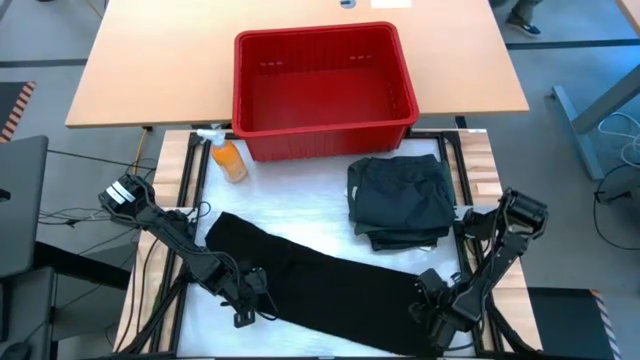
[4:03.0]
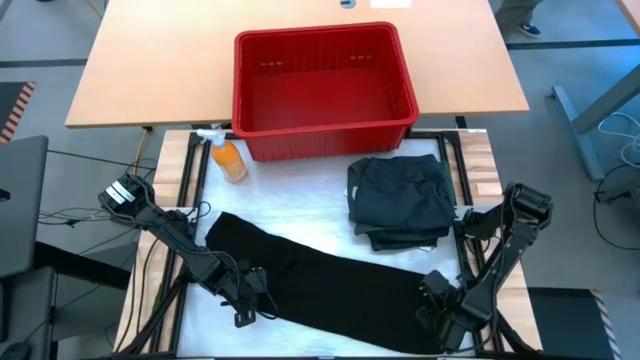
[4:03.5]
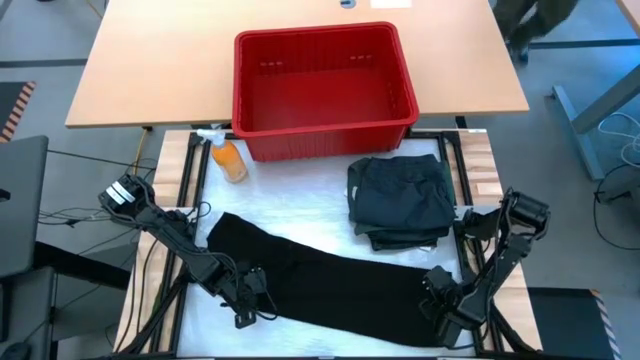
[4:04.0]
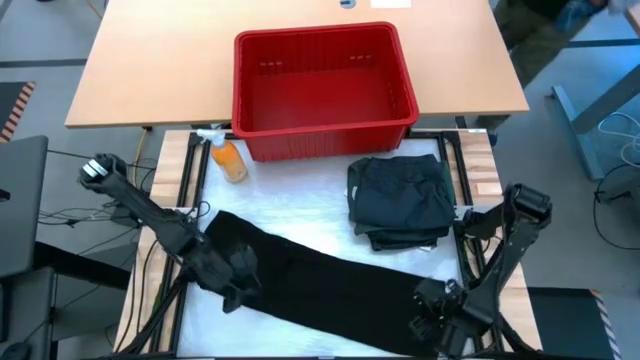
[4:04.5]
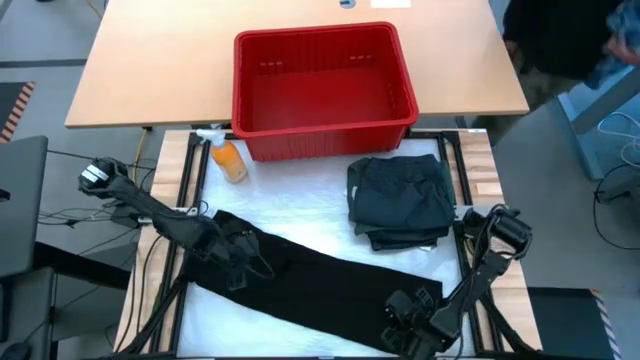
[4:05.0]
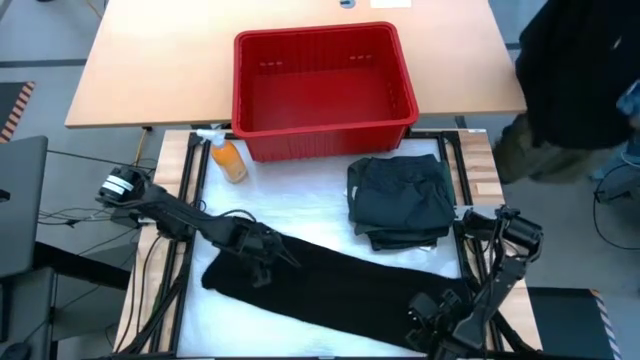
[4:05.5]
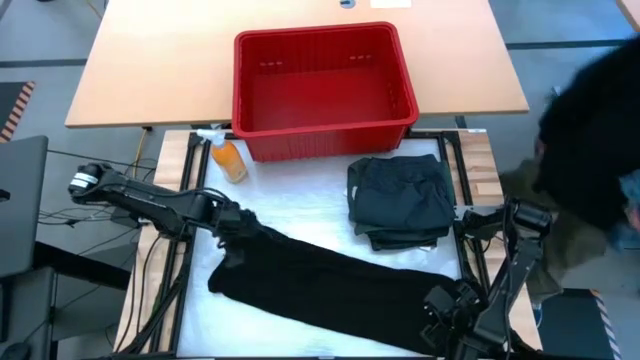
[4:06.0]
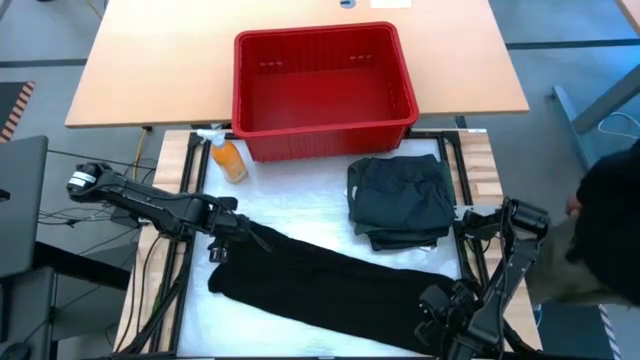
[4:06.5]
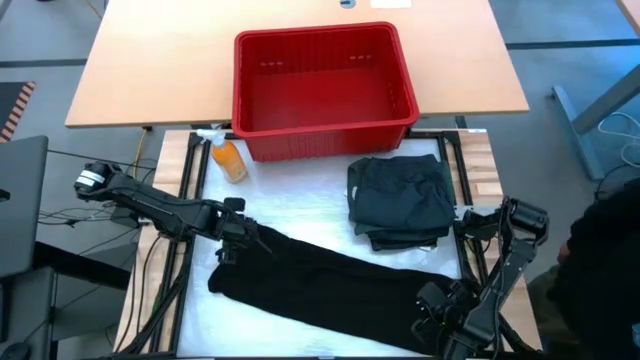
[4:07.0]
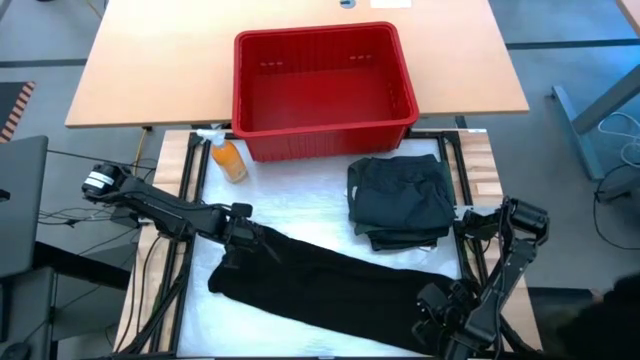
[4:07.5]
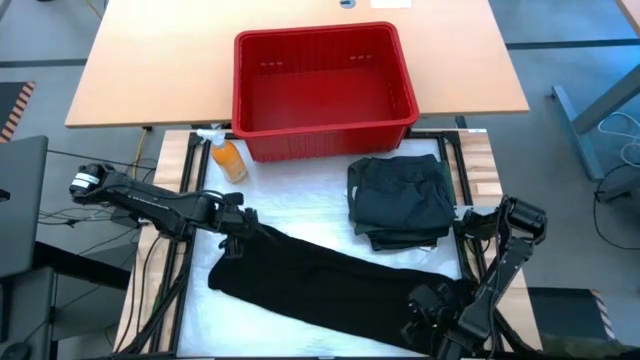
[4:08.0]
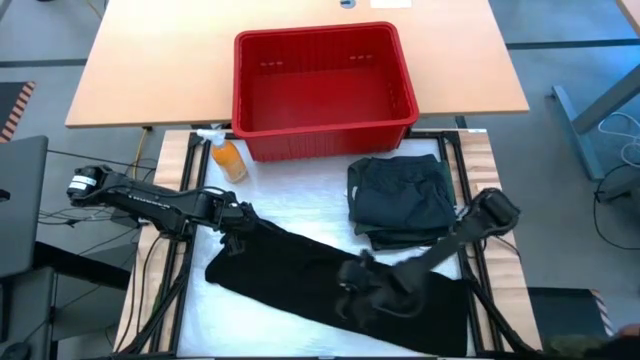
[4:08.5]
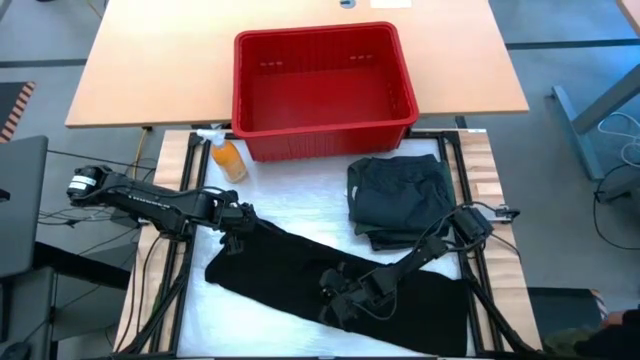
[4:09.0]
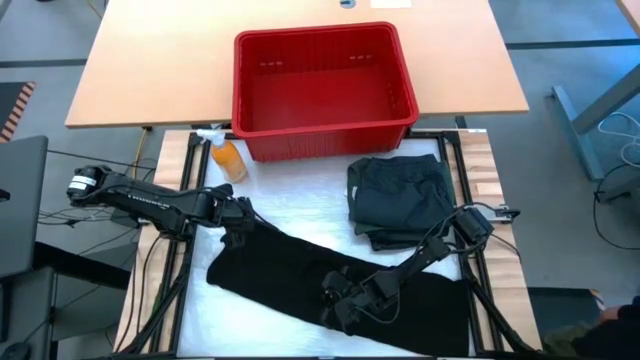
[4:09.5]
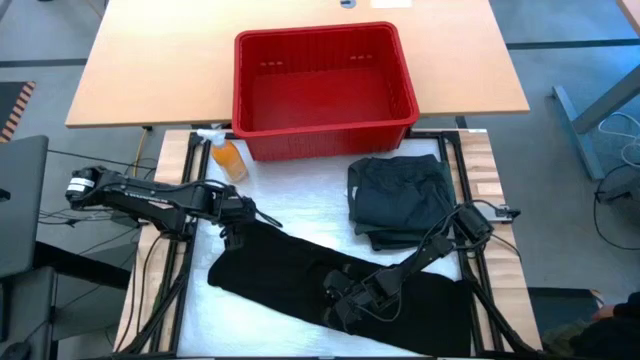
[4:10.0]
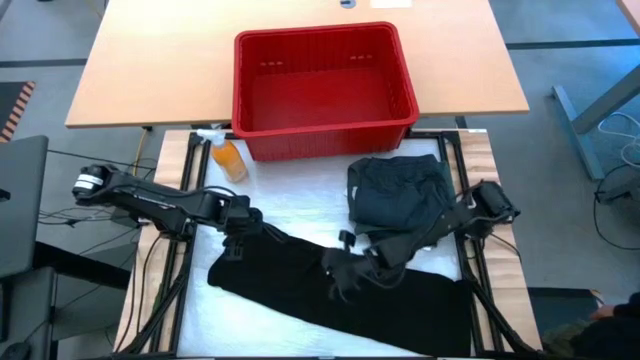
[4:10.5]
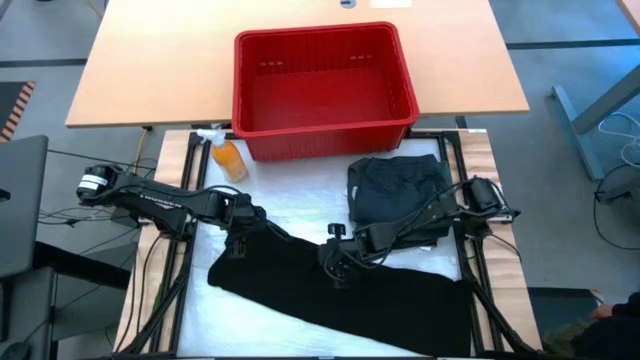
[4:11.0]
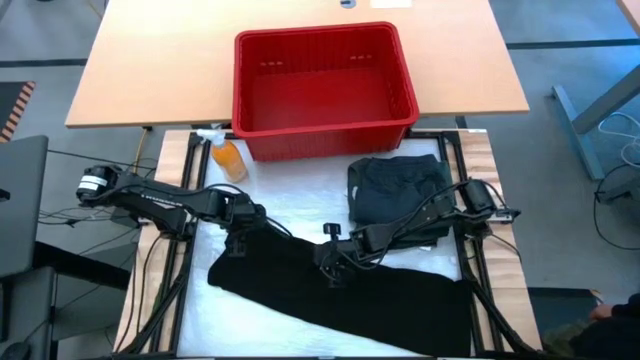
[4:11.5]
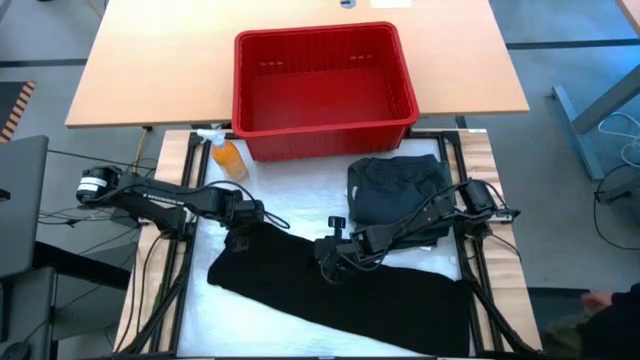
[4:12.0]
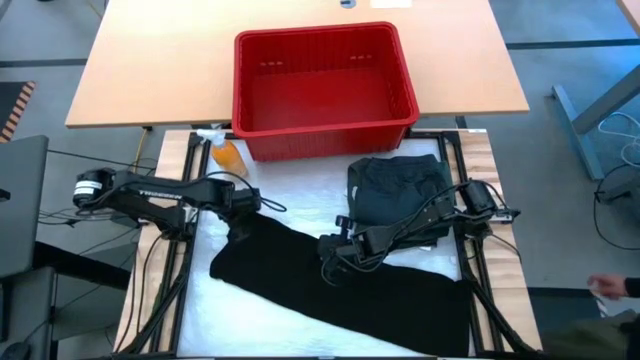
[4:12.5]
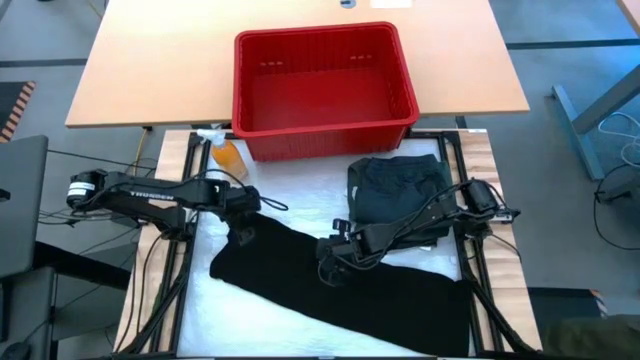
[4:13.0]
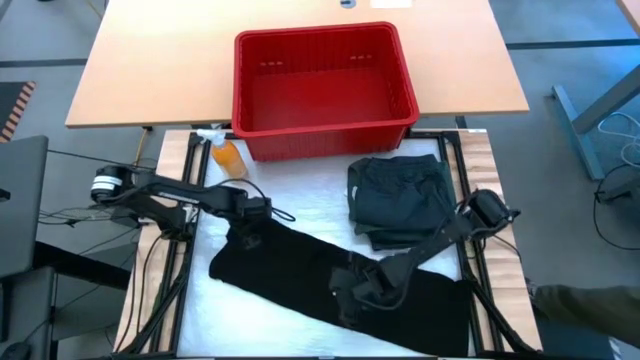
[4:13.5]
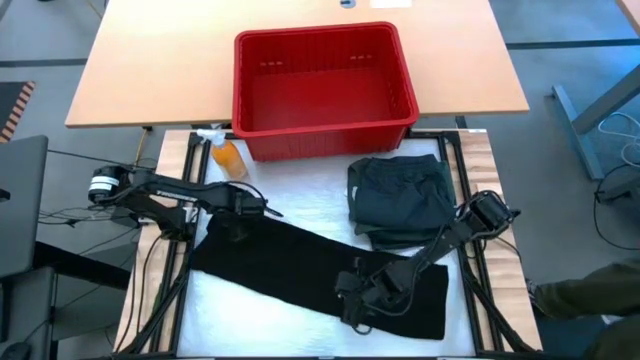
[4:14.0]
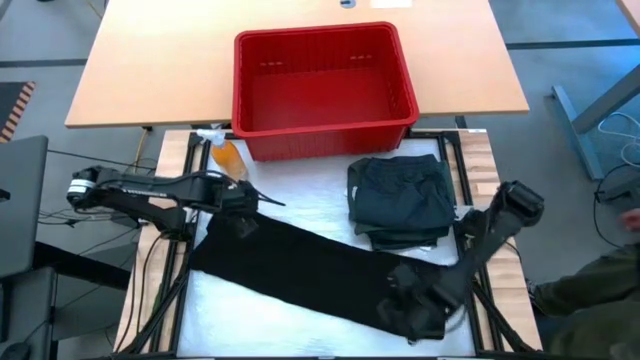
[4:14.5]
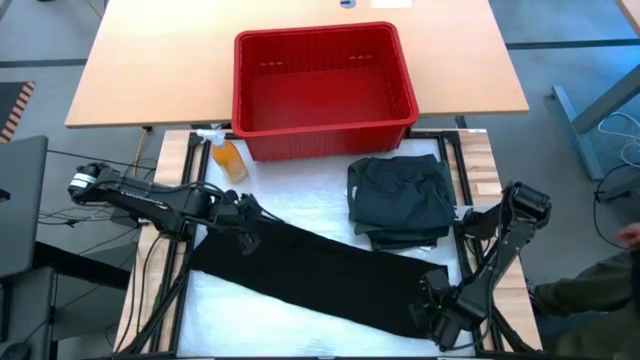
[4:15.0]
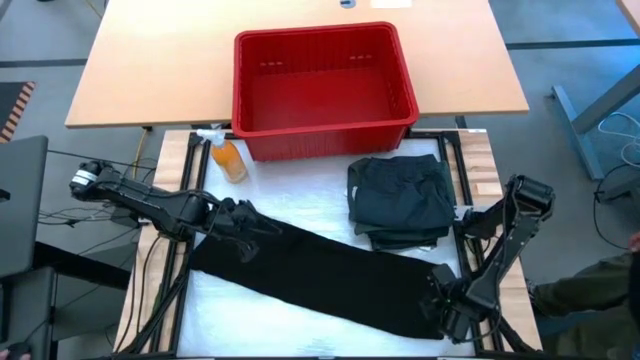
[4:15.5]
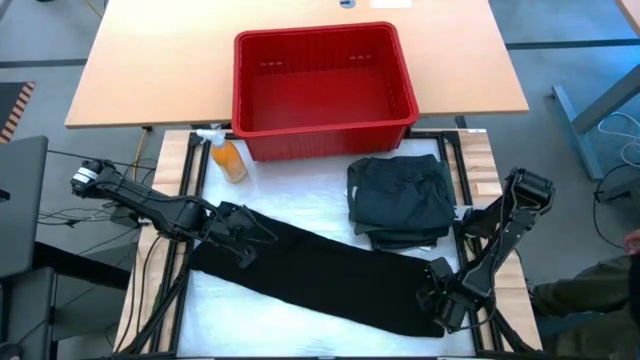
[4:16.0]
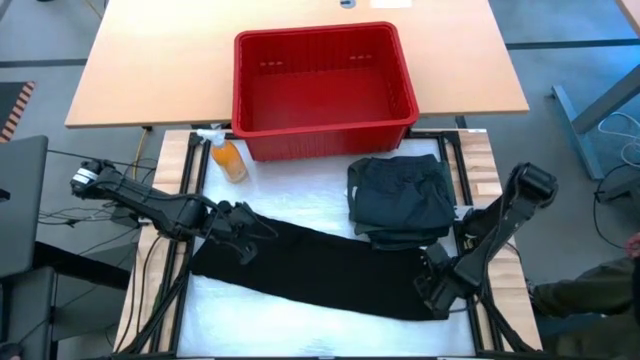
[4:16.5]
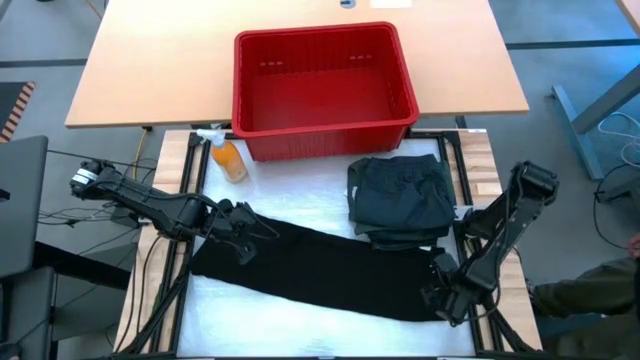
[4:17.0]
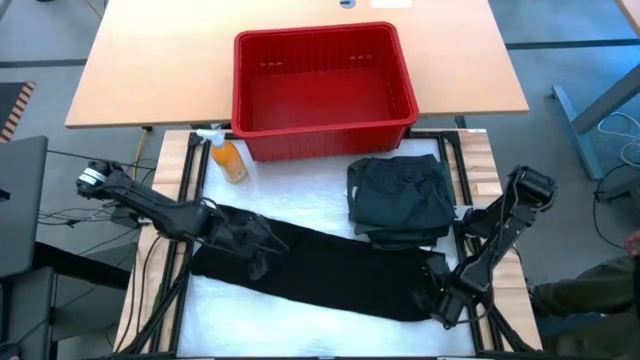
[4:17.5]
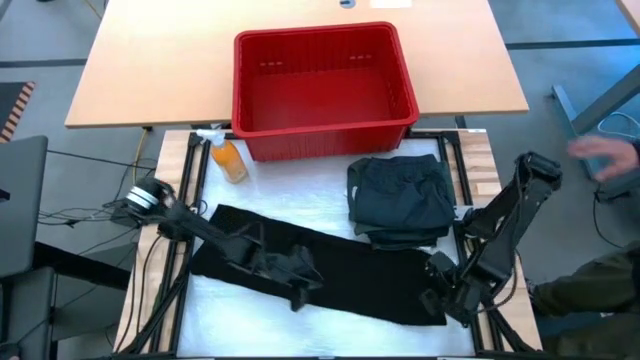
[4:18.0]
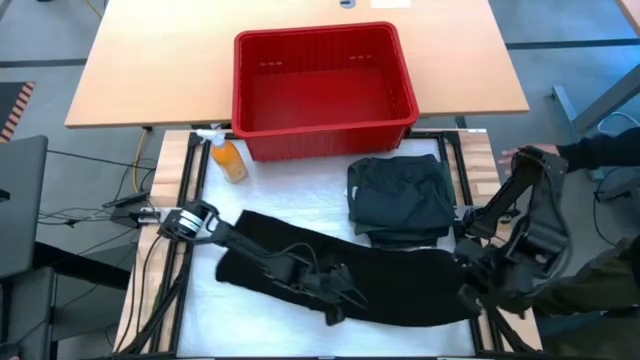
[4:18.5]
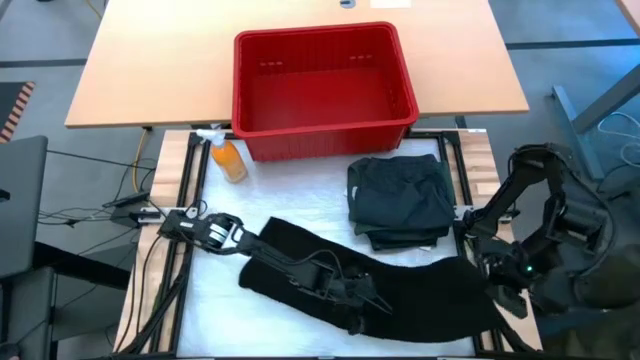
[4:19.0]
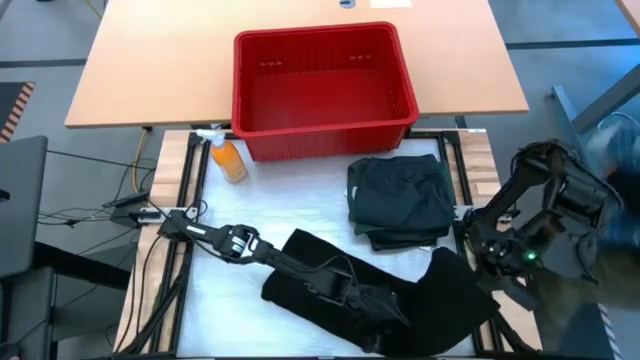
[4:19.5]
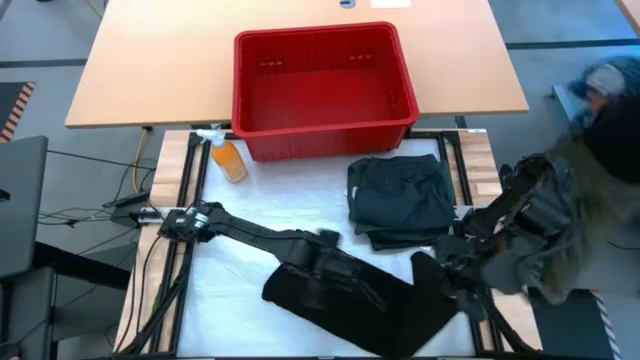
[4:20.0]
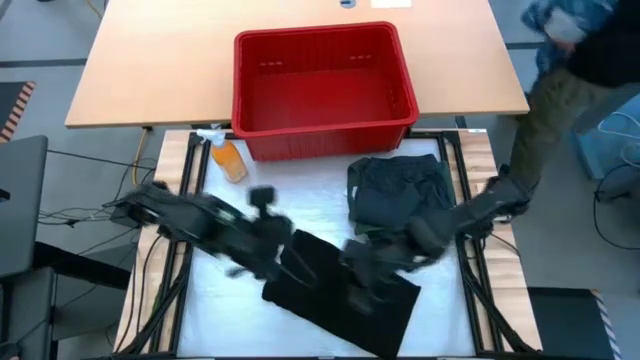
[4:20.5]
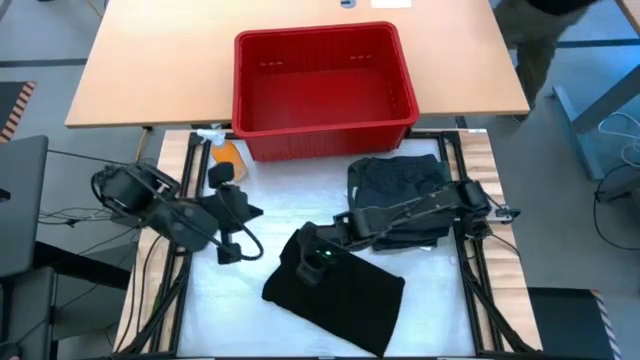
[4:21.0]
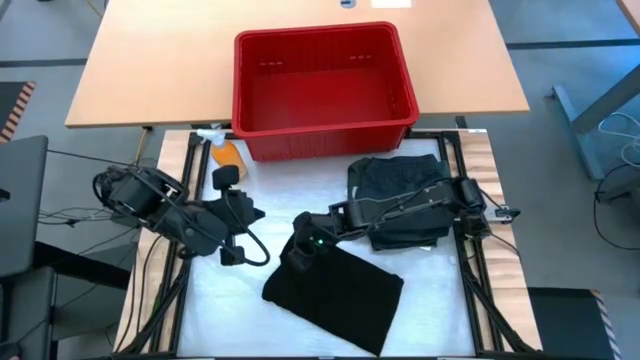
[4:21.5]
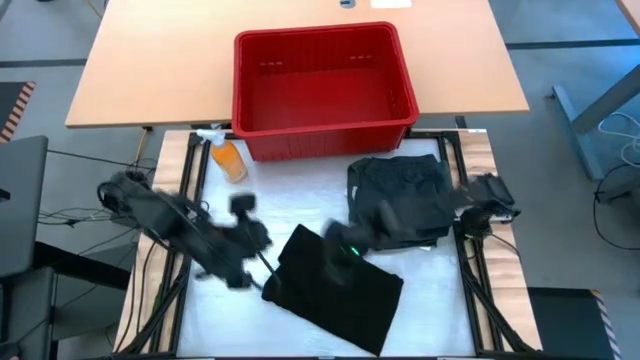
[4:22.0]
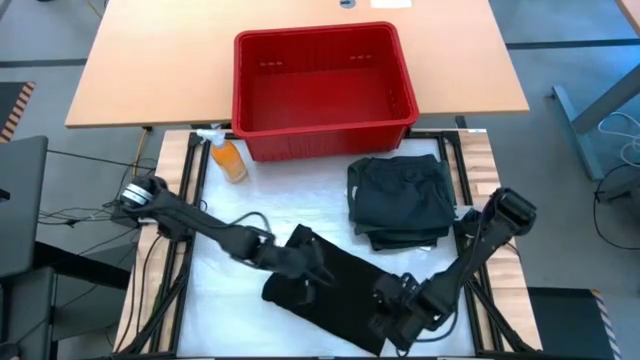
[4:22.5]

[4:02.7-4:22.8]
Task: Fold Laundry from Bin
Fold the black shirt

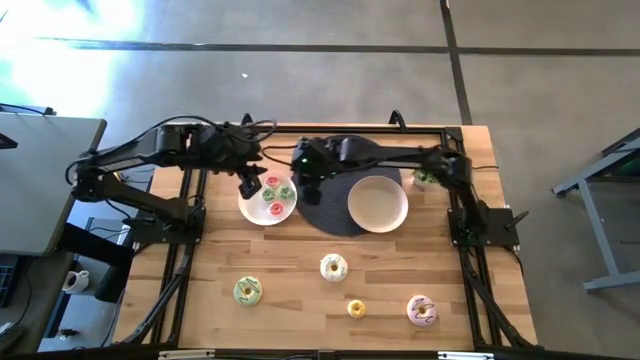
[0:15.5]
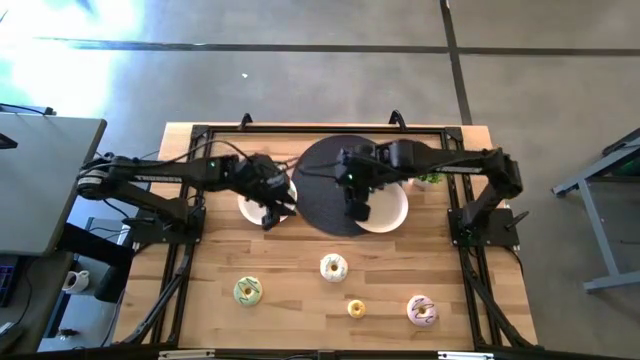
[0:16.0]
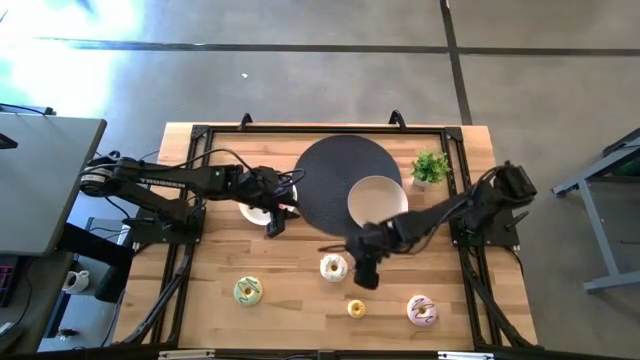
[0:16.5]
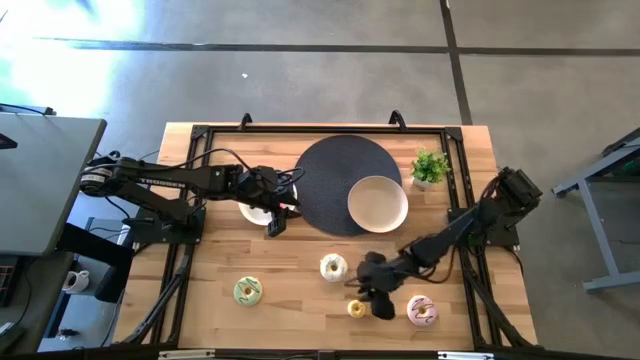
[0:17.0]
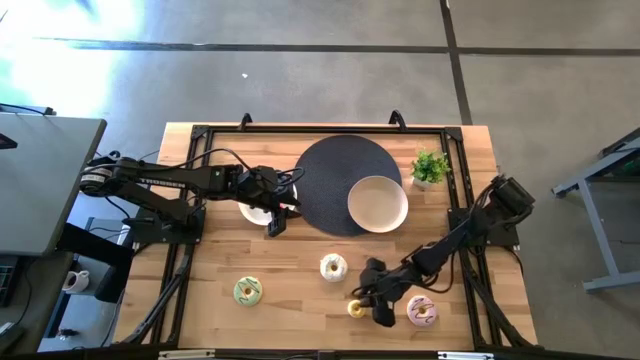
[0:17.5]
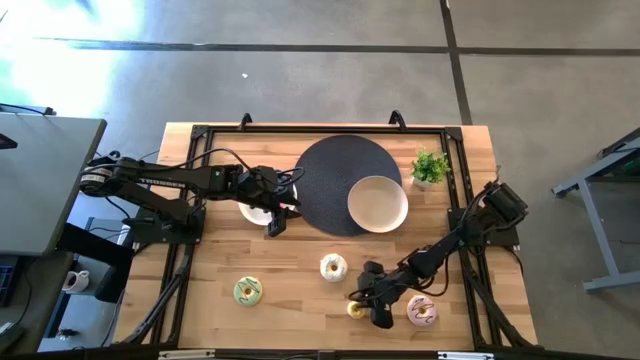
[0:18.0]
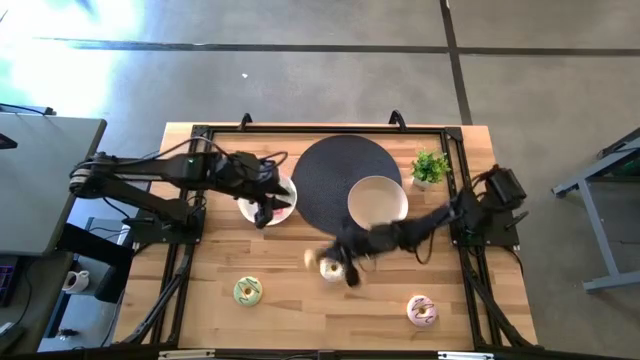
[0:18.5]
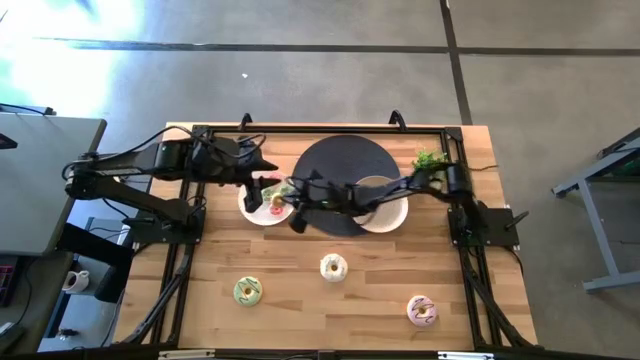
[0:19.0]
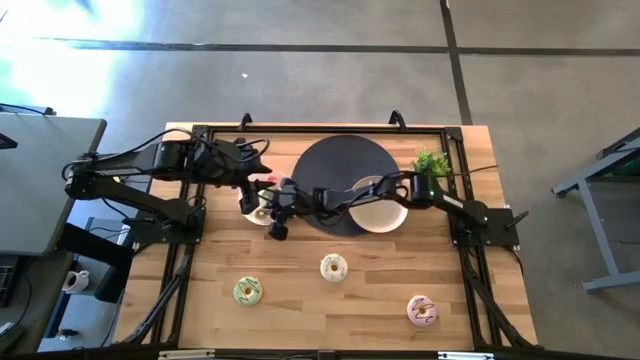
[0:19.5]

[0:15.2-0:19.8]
Task: Pick & Place donuts
Put the small yellow donut into the white plate
